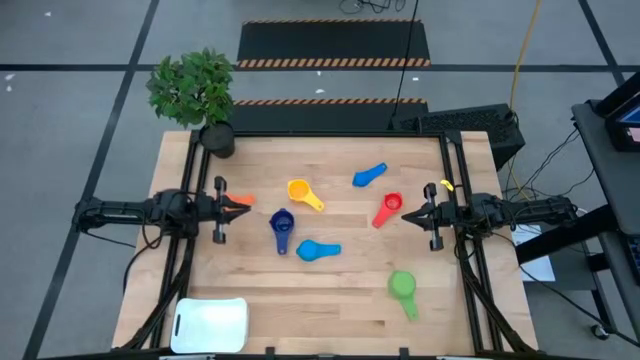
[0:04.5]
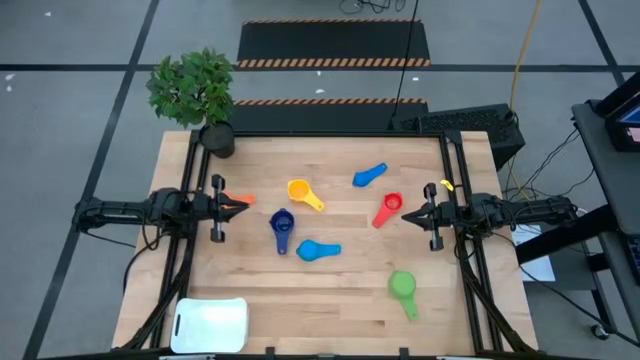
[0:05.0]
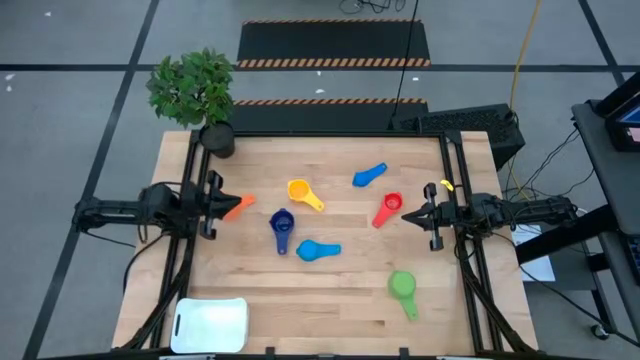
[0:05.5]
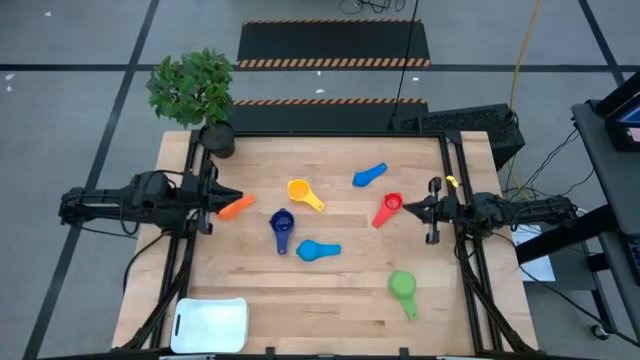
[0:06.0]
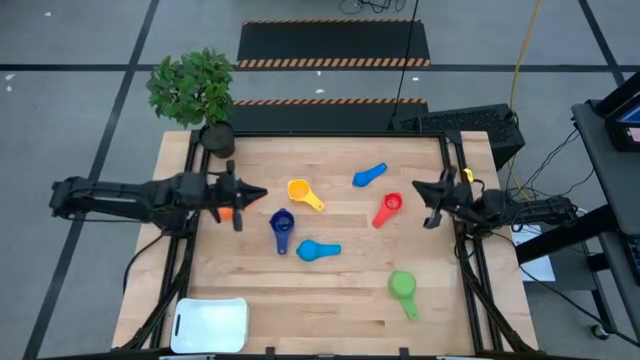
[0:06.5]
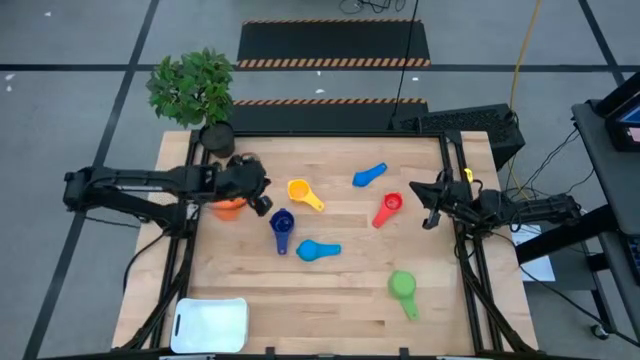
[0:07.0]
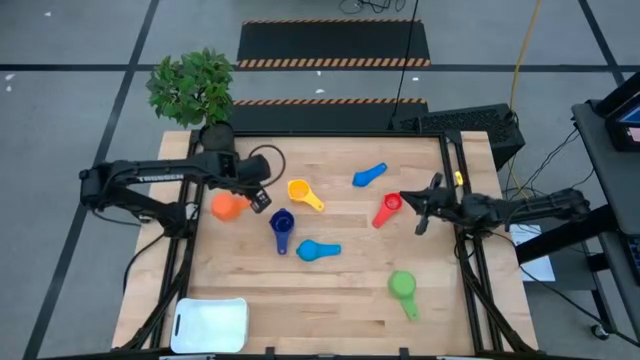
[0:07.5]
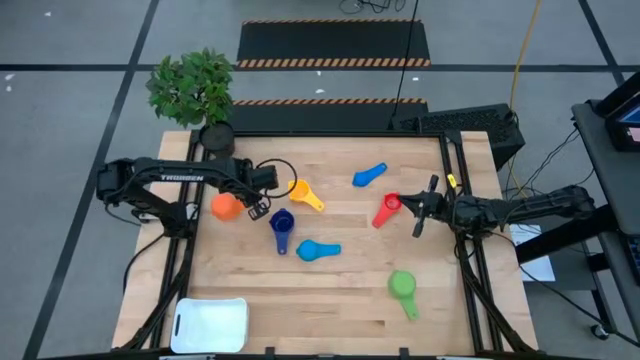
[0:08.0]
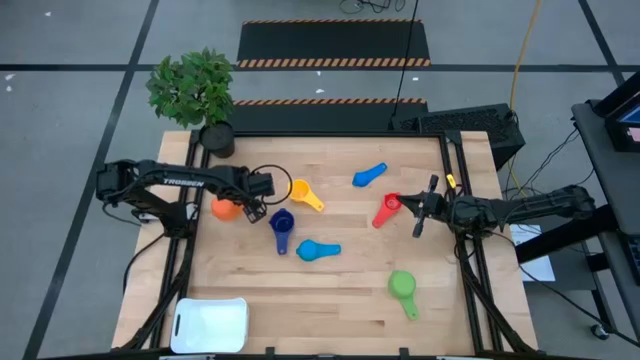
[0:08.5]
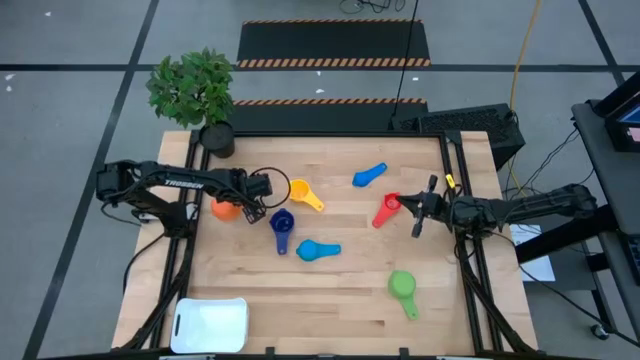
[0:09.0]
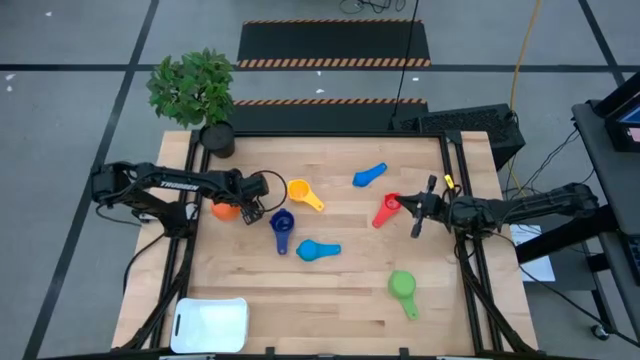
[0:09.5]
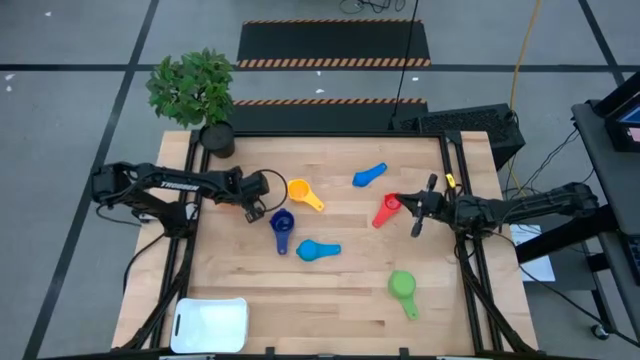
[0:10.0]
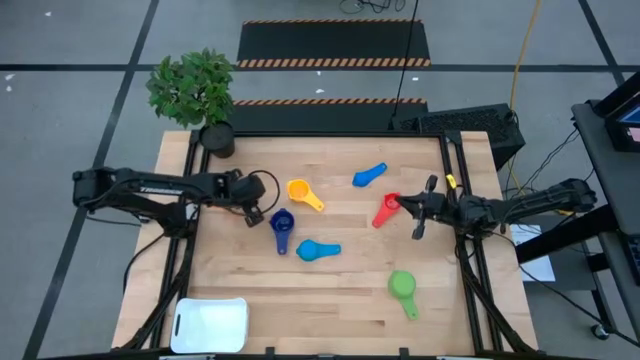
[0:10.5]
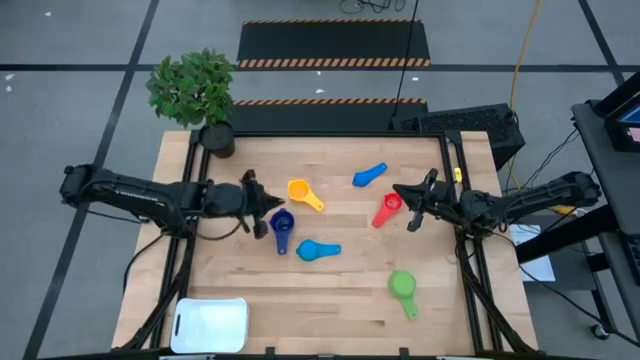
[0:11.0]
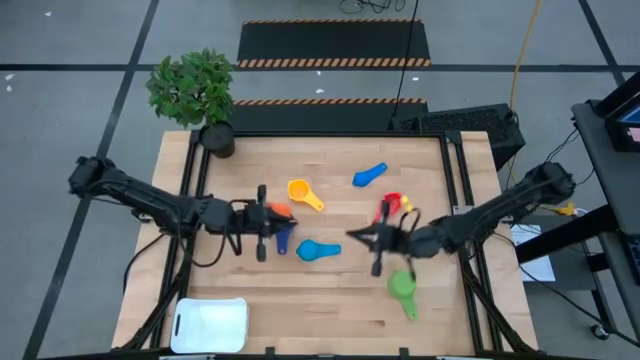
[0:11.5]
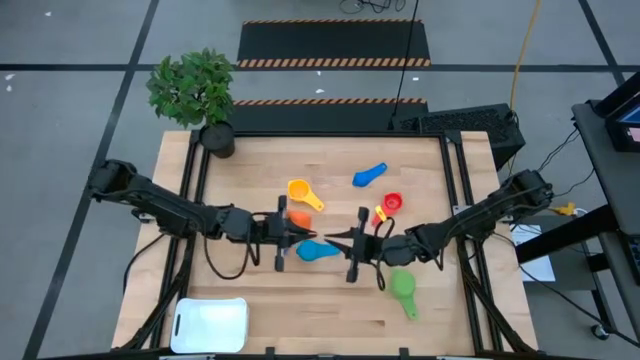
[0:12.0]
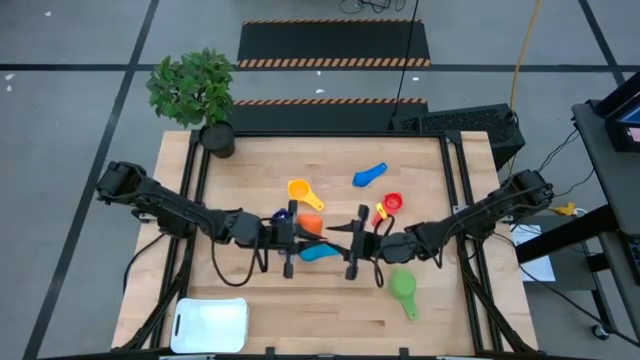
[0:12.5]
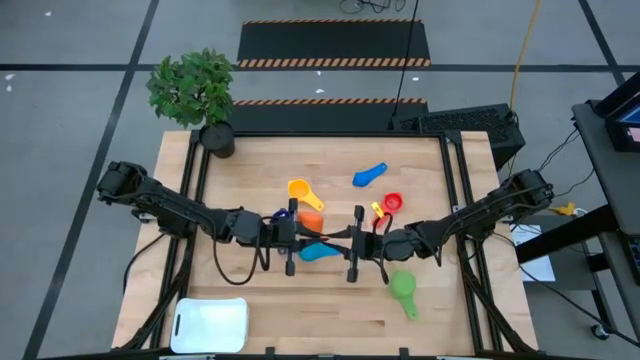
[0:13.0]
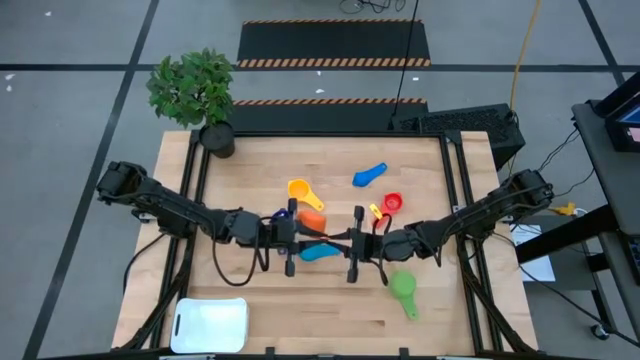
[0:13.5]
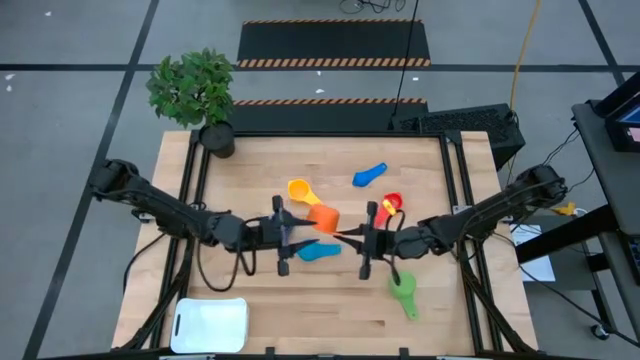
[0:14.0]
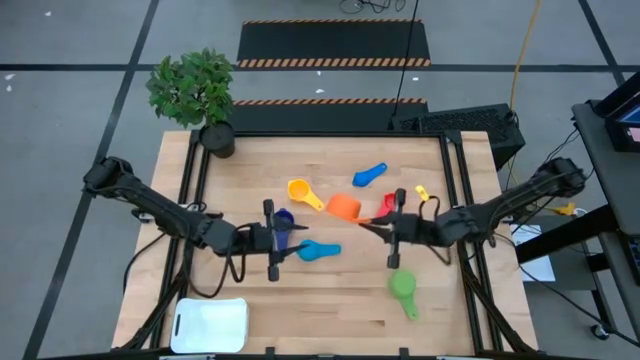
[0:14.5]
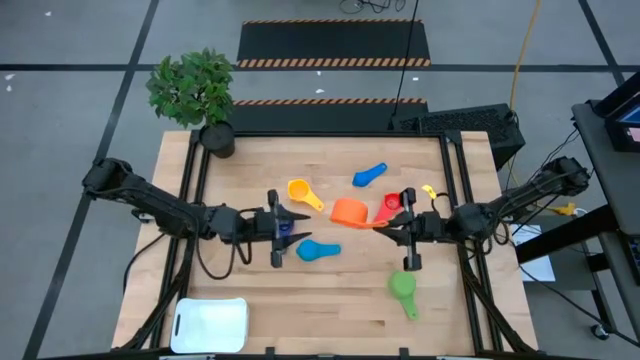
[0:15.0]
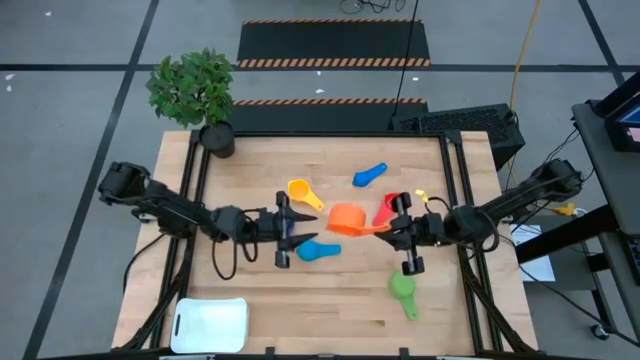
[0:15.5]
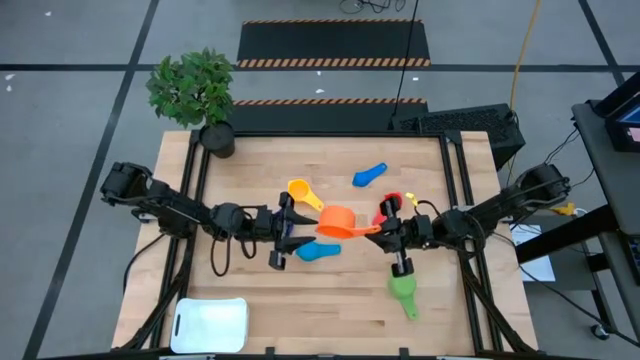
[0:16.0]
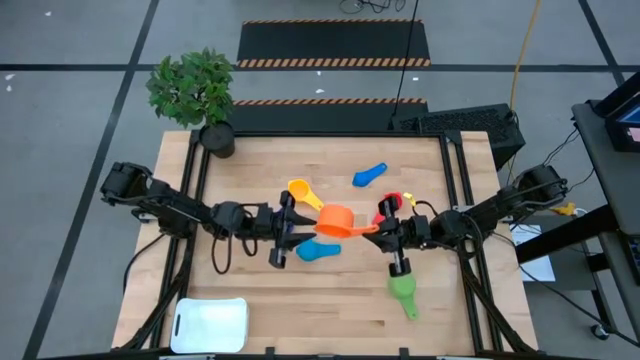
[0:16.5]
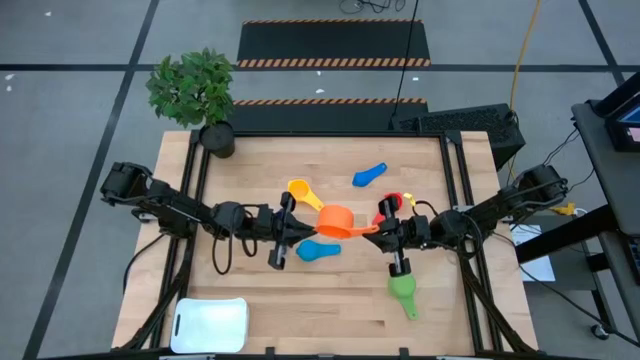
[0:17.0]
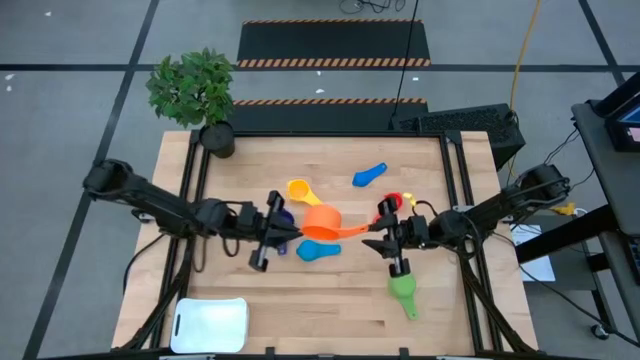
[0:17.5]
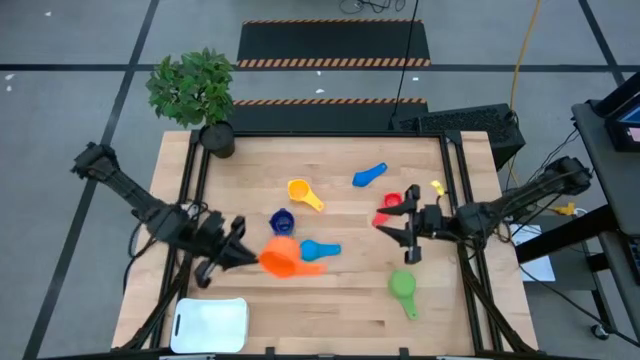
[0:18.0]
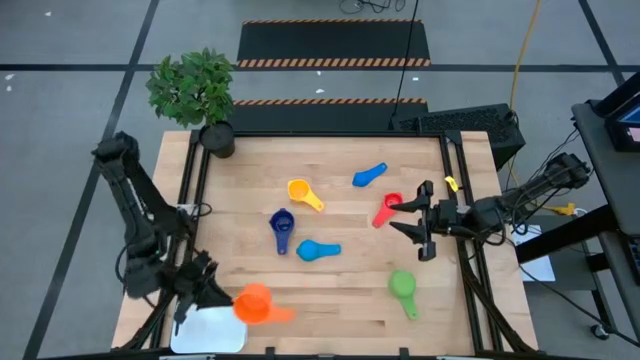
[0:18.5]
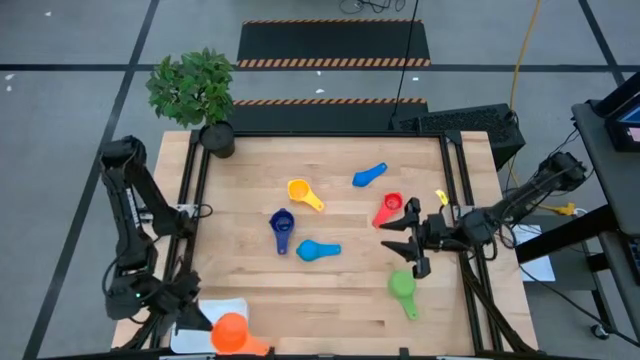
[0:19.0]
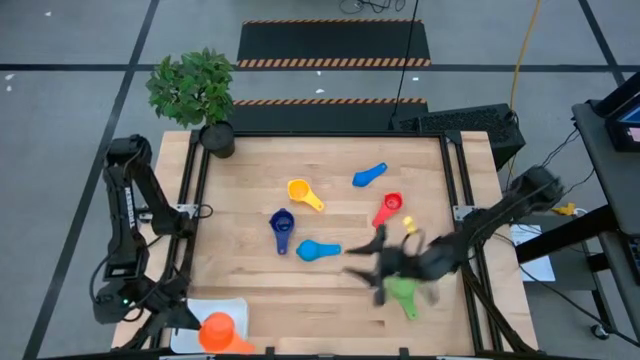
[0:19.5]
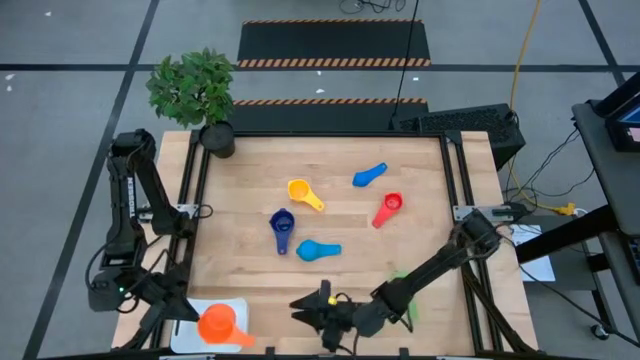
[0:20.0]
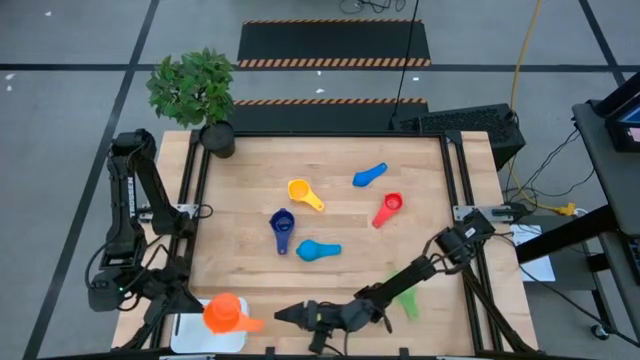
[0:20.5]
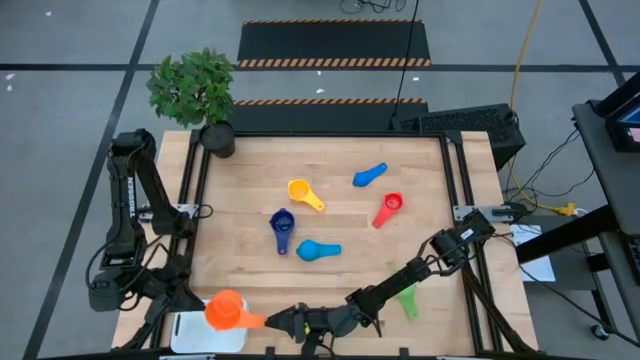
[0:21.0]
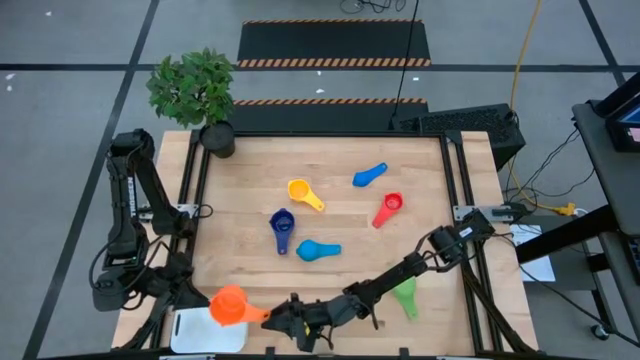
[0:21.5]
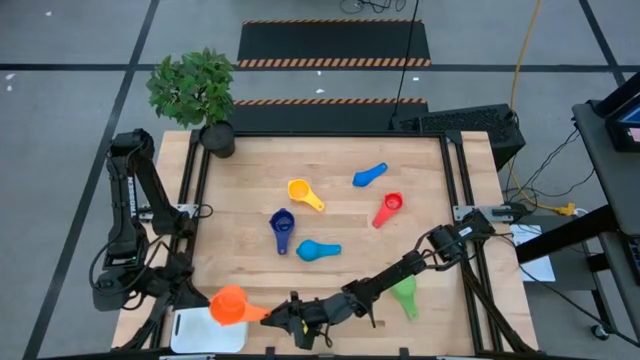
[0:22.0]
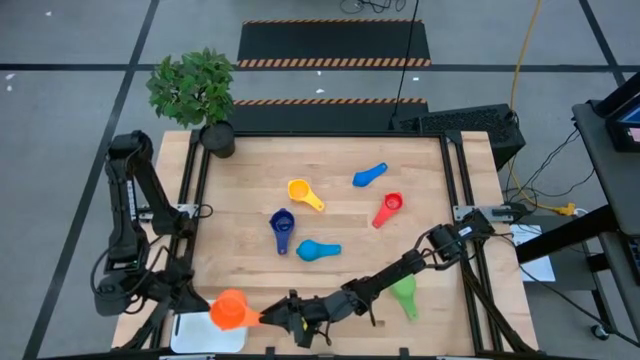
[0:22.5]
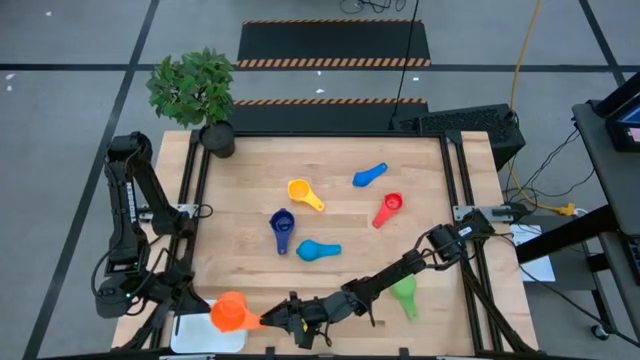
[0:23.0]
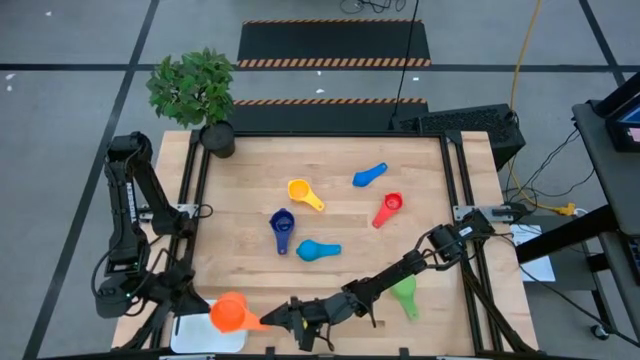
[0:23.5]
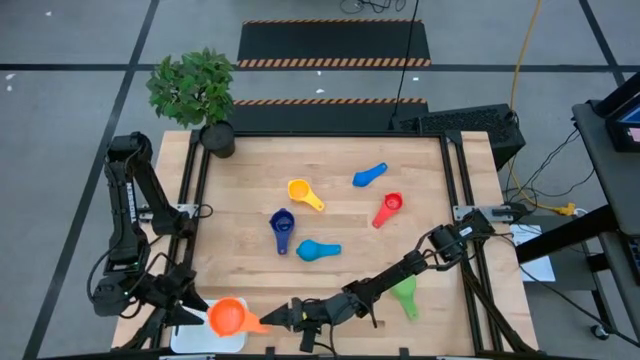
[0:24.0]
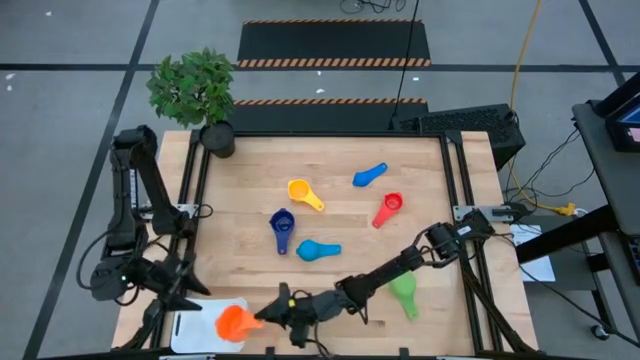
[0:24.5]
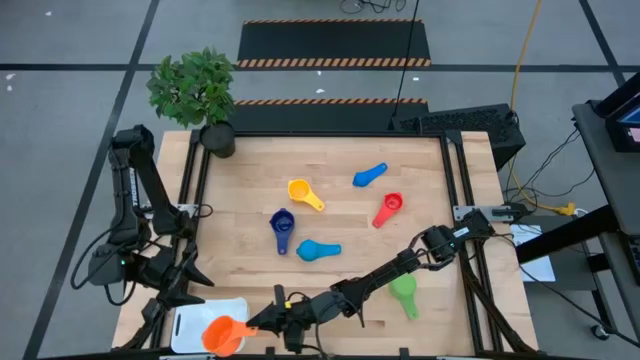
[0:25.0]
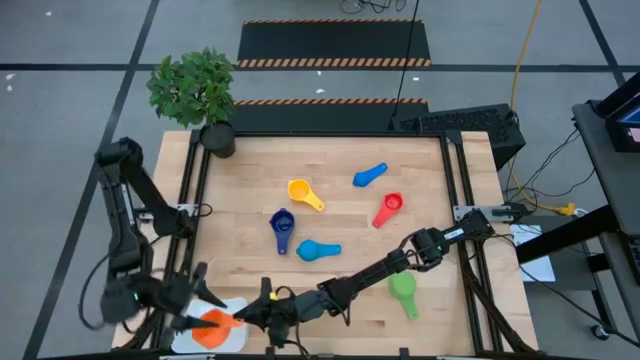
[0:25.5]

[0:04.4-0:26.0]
Task: Nest measuring cups in basket
Put the orange measuring cup into the white bin
